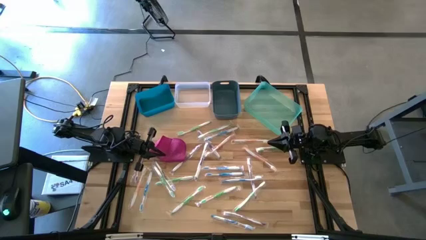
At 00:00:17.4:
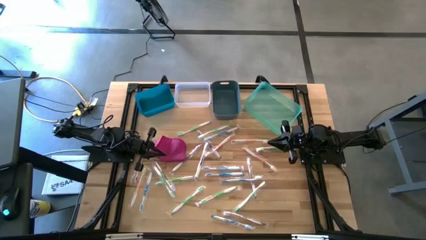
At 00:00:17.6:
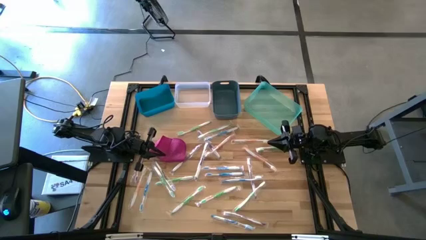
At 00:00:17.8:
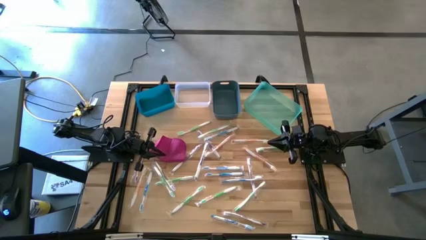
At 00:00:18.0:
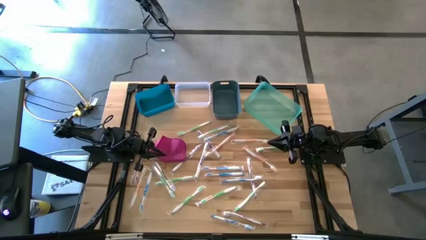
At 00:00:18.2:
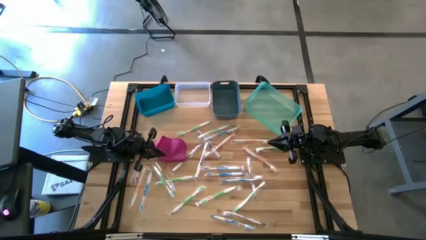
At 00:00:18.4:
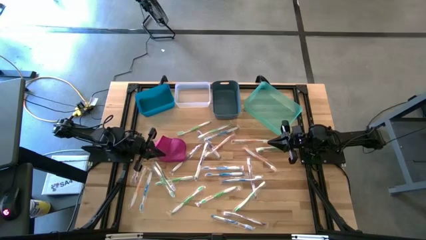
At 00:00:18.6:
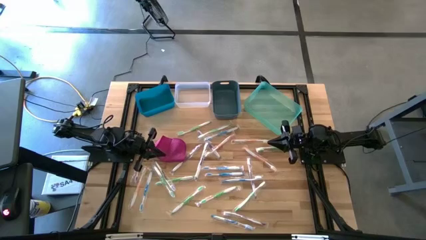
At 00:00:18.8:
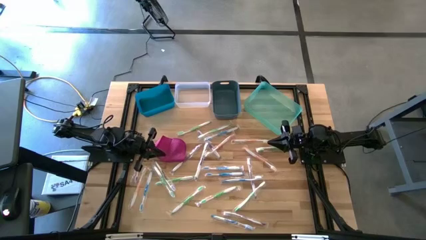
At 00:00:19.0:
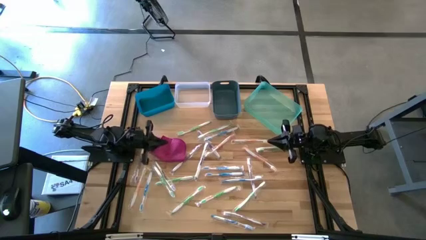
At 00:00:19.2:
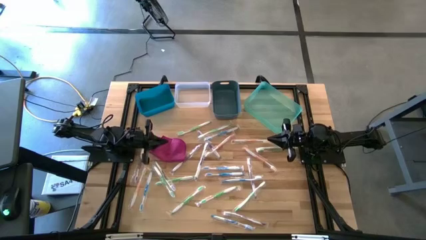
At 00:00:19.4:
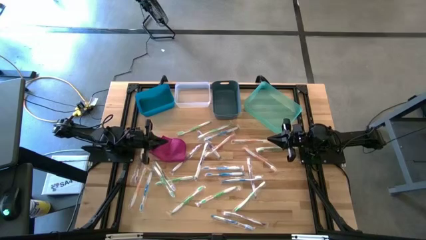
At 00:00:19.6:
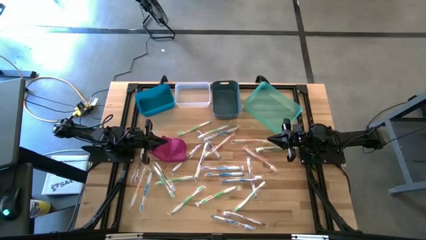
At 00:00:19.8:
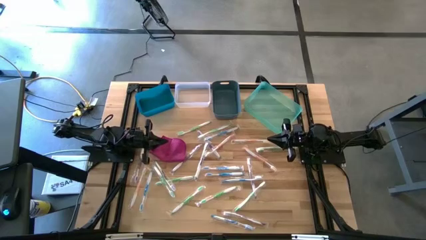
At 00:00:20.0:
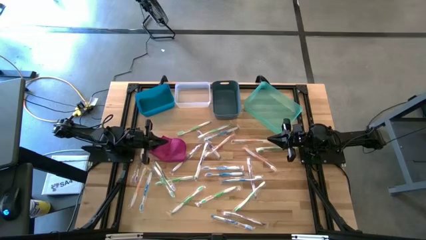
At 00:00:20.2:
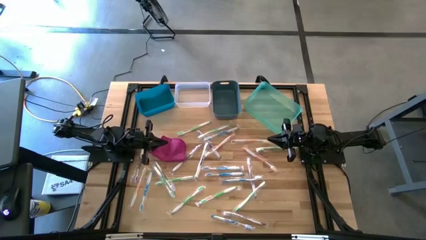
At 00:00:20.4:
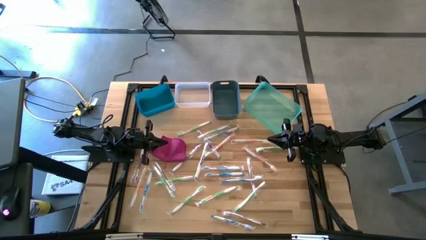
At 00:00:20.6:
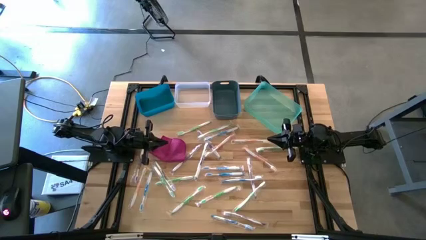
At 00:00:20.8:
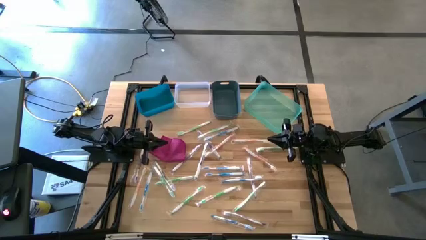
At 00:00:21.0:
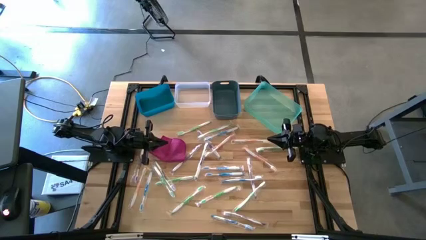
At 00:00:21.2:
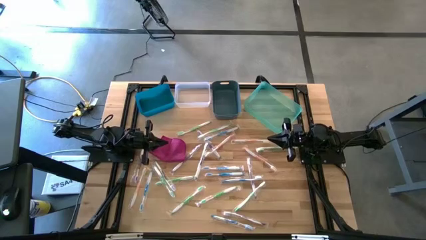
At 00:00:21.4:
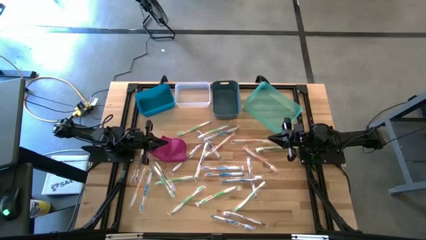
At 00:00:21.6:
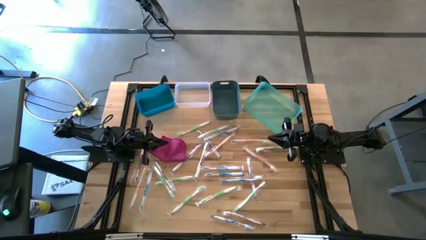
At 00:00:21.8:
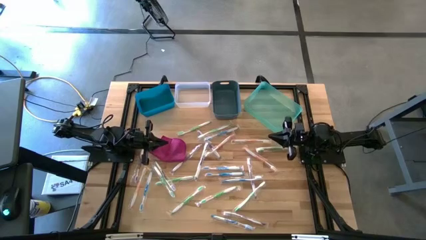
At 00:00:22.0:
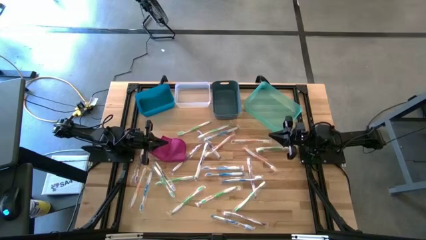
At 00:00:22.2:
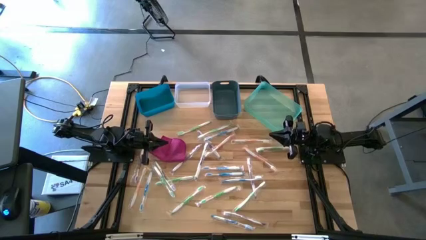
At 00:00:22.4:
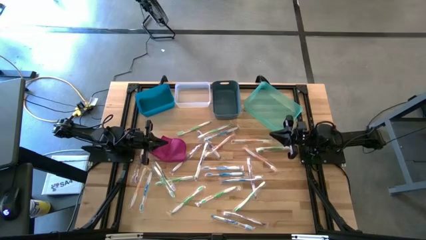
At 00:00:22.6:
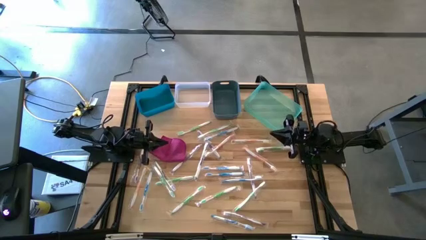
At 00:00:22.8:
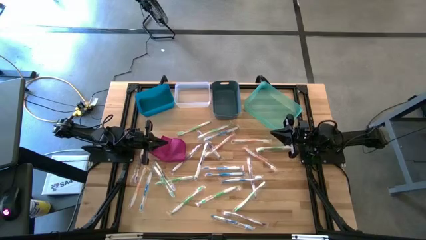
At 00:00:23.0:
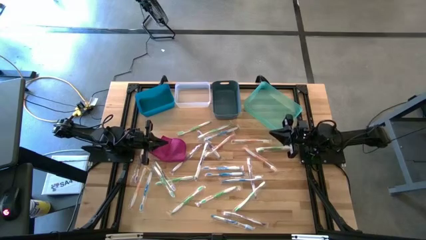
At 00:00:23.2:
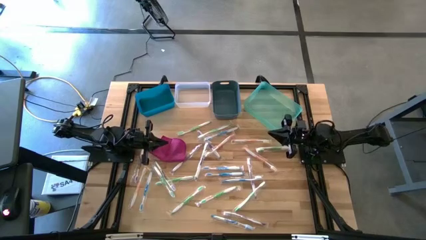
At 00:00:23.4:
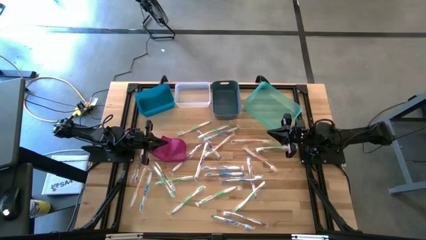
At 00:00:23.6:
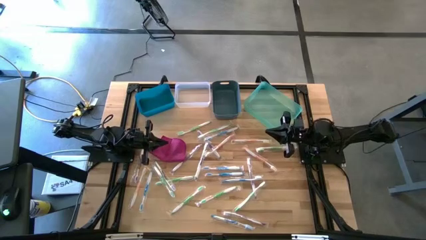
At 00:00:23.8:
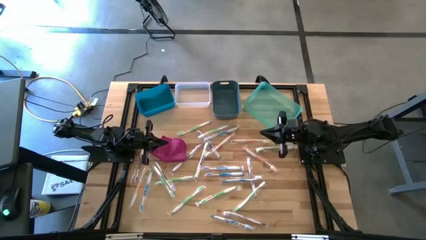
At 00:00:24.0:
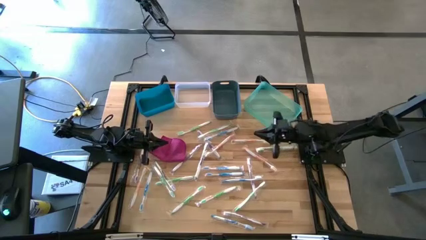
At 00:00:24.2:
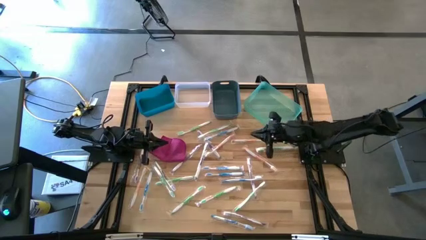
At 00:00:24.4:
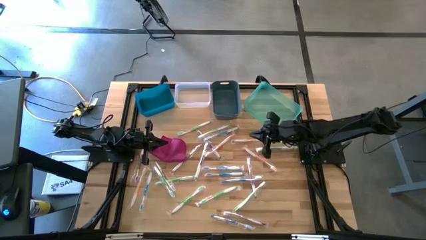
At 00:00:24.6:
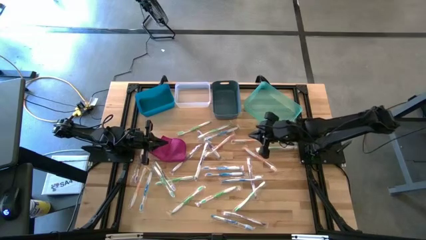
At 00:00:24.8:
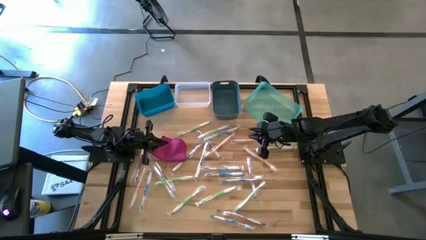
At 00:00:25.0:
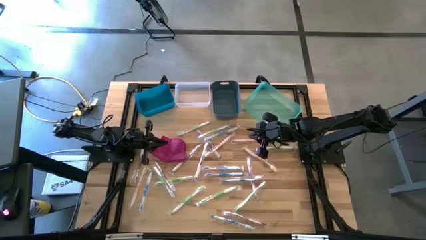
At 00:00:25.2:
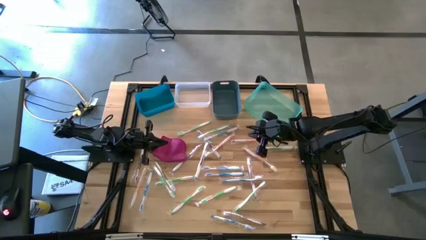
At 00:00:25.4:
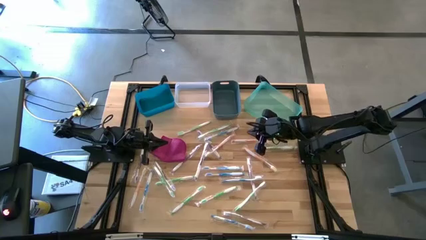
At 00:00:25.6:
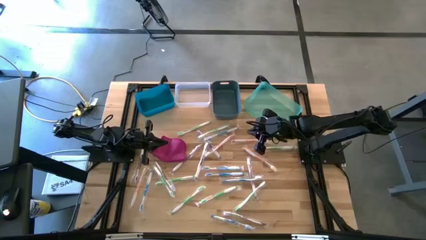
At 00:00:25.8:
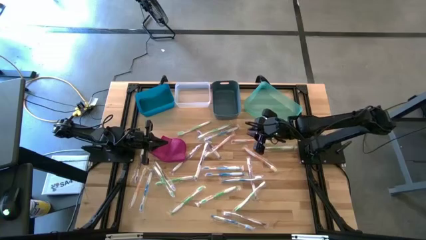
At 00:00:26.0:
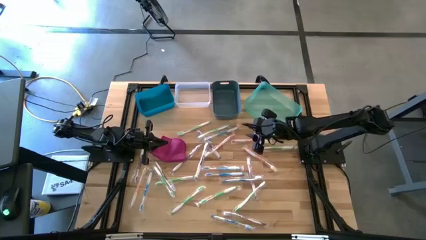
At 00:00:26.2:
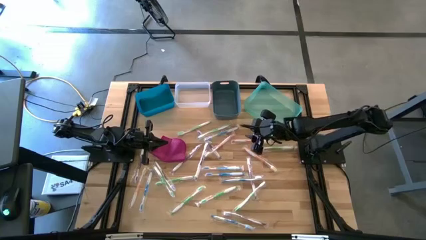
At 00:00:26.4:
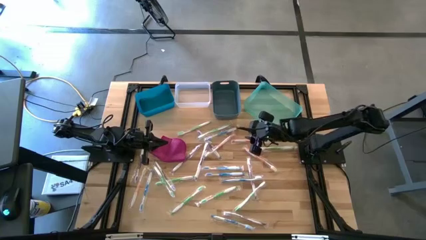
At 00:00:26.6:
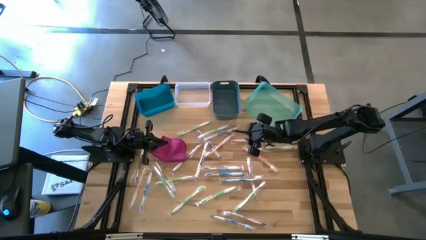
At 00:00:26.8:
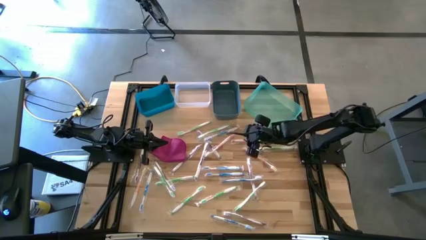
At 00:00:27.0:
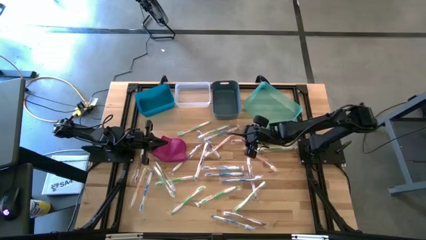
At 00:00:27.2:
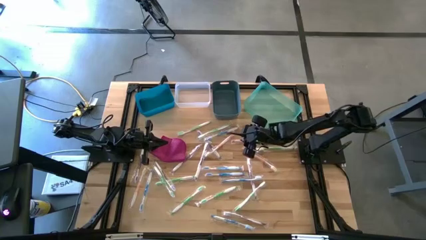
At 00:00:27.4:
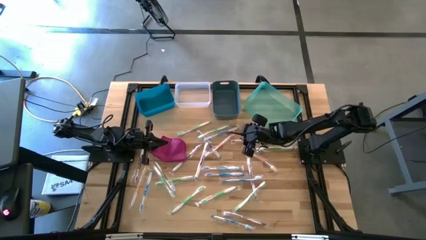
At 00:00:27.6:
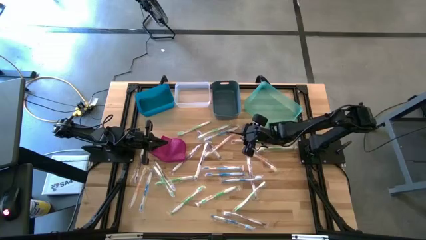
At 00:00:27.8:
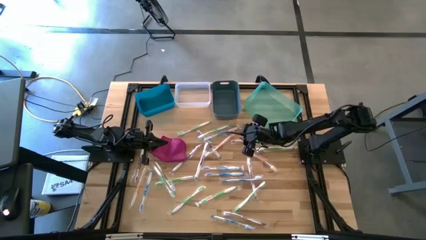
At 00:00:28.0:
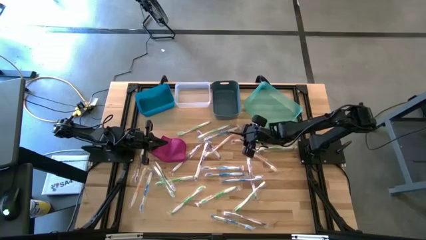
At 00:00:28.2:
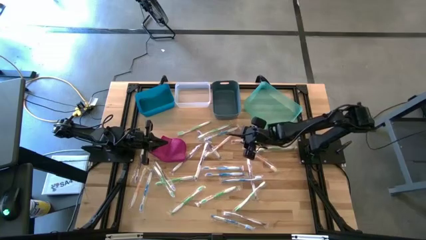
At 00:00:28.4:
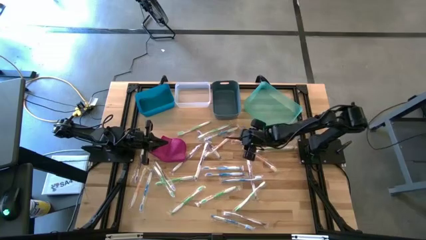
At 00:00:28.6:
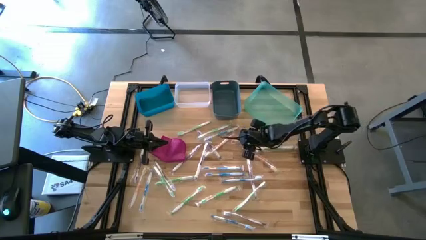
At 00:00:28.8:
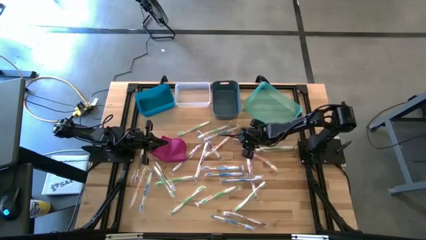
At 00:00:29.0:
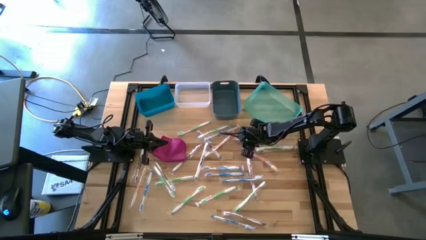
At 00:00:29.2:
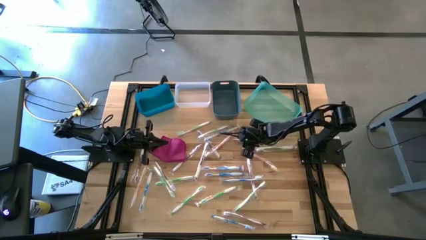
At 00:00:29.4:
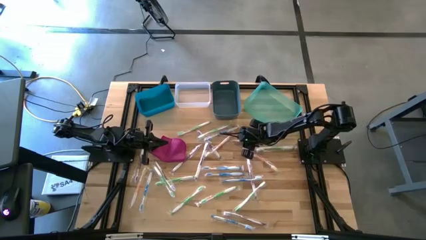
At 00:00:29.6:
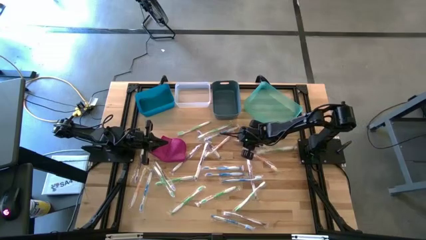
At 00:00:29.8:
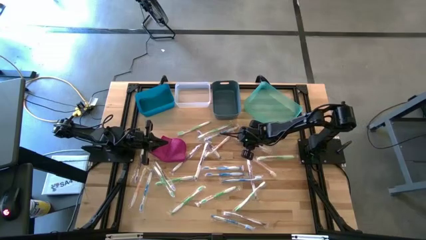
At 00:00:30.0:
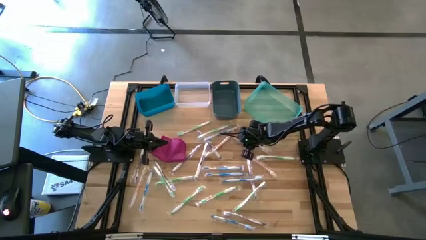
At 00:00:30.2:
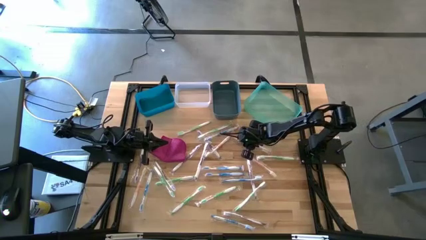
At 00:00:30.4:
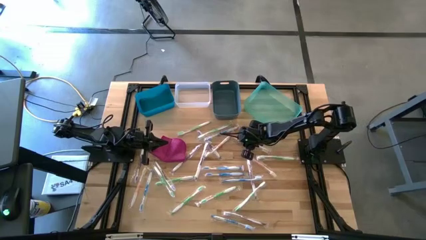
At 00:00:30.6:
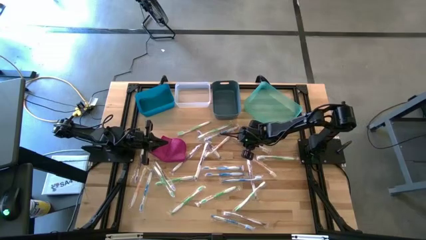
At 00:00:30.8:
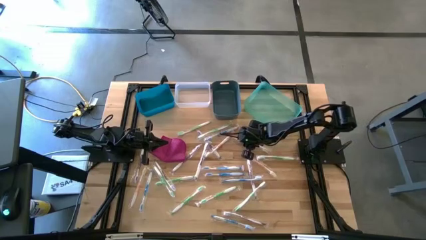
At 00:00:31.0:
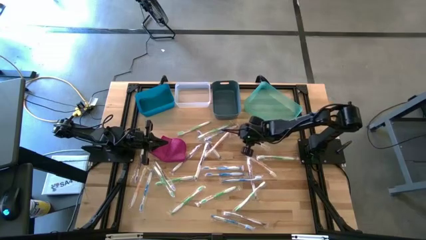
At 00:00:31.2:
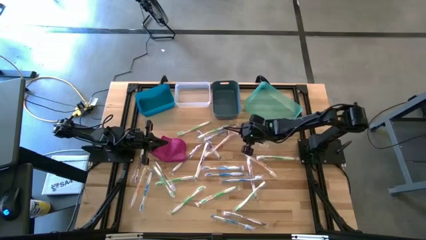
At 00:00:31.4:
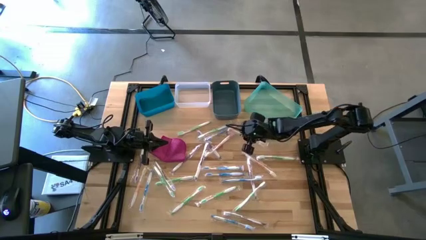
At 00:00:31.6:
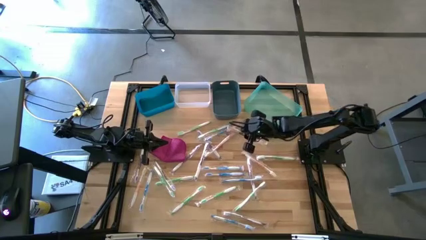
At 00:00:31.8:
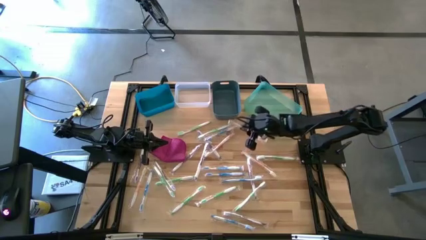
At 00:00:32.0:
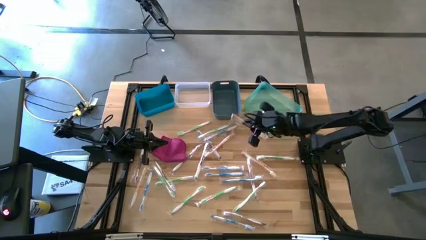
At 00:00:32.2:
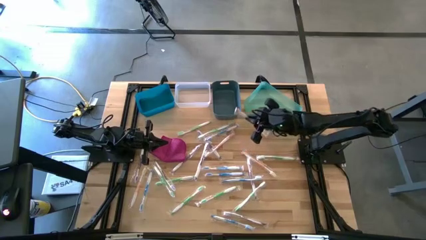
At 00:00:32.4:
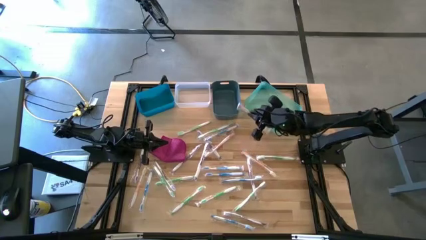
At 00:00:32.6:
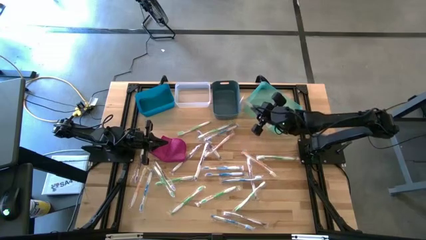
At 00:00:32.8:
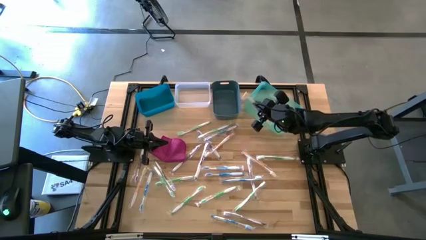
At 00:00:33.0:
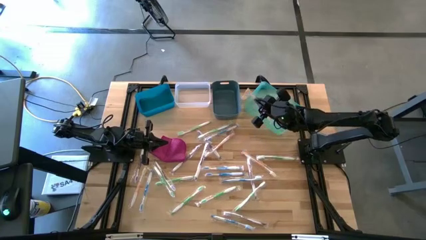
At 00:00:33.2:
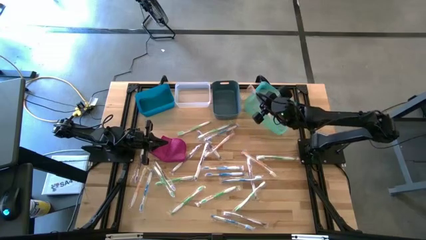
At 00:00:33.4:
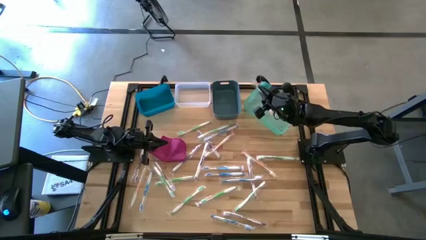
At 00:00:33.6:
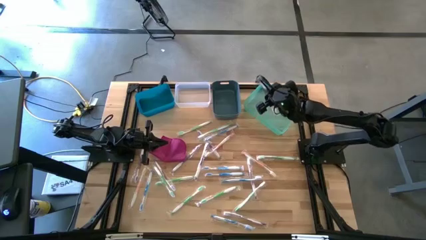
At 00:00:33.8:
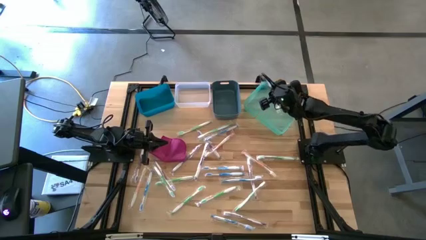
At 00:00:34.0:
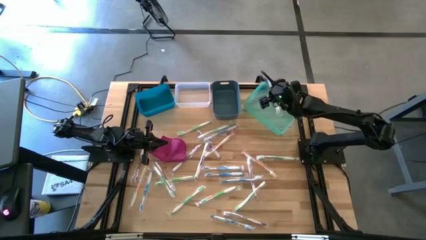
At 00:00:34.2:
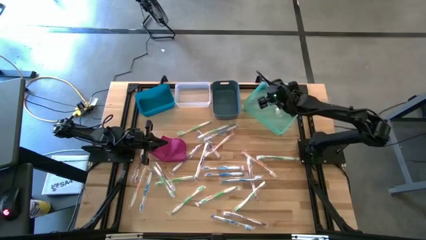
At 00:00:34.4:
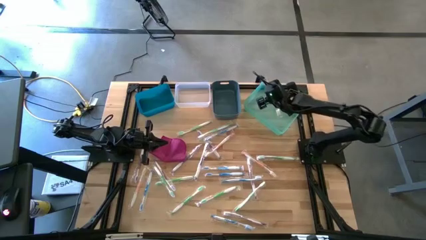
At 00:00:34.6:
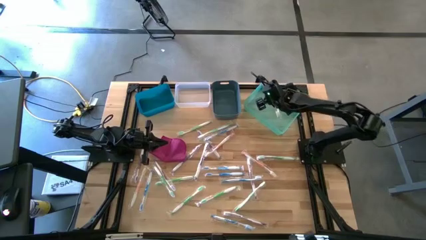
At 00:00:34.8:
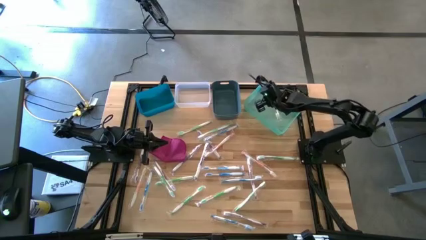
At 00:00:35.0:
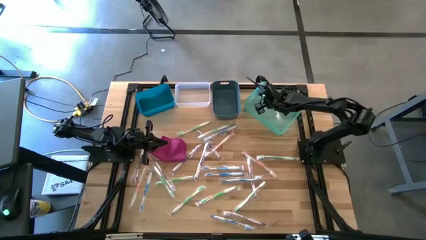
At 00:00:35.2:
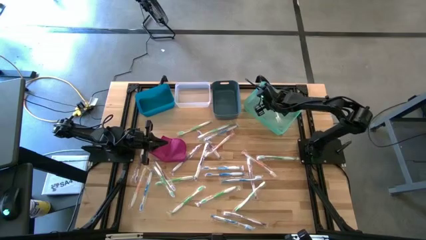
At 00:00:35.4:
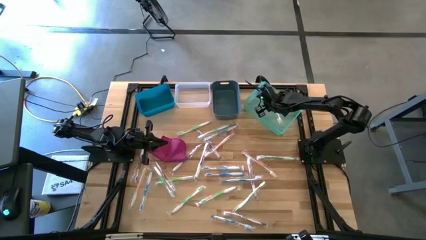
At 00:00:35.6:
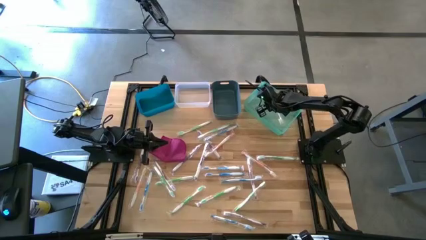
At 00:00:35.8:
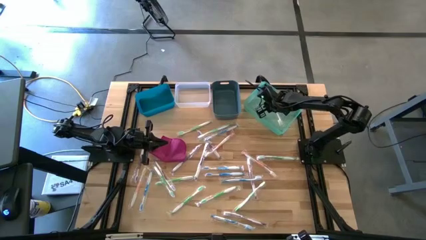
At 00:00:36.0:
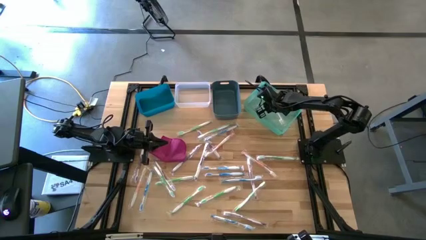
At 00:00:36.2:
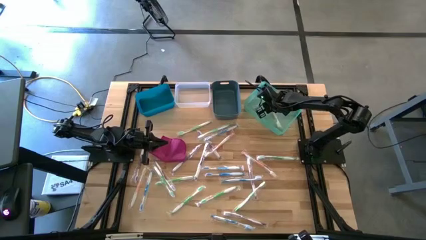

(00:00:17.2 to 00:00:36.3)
Task: Pick & Place Toothbrushes
Put the orange toothbrush into the light blue bin
